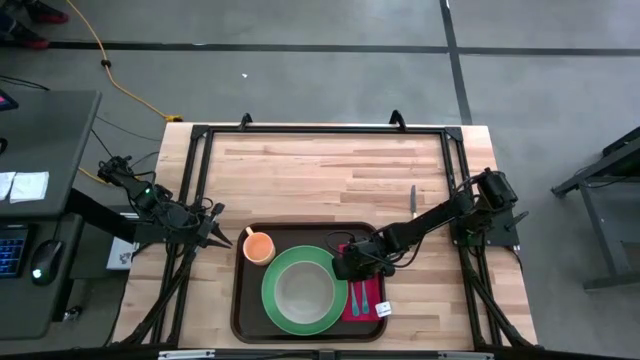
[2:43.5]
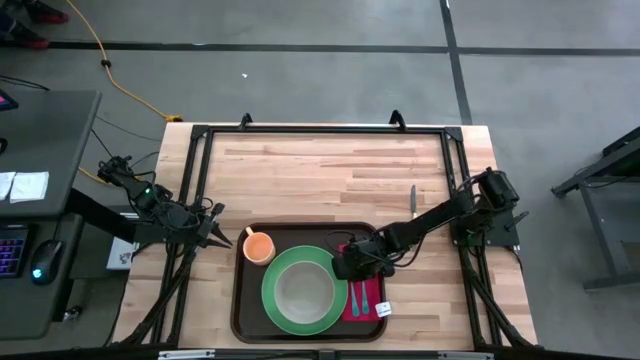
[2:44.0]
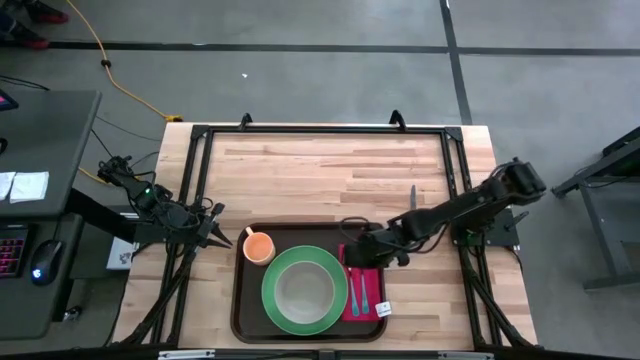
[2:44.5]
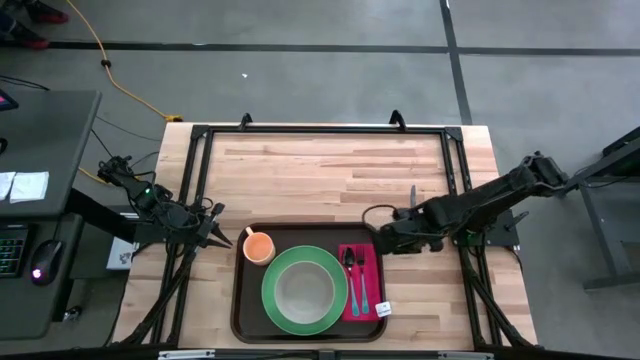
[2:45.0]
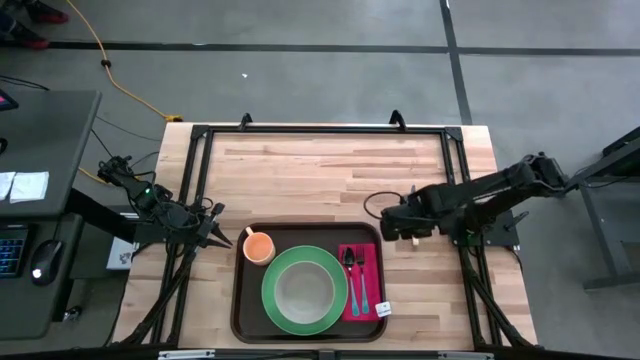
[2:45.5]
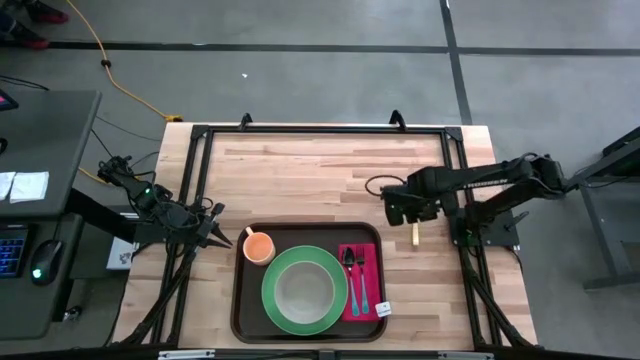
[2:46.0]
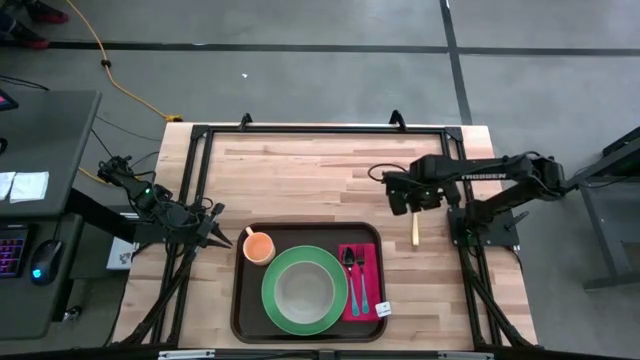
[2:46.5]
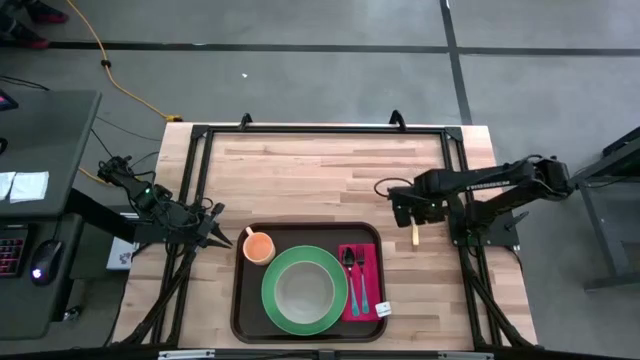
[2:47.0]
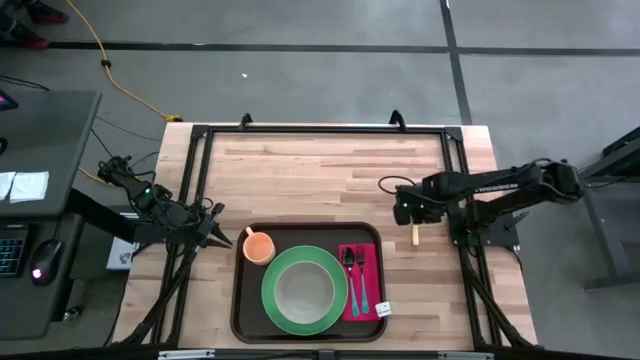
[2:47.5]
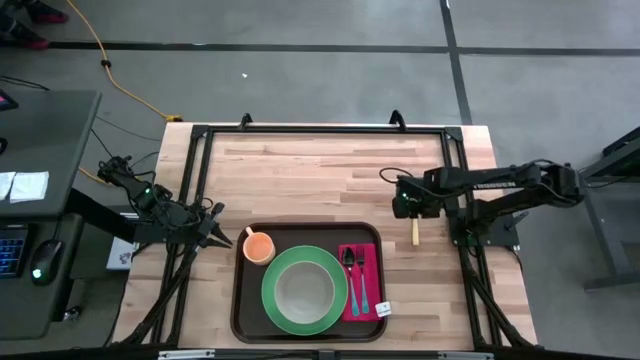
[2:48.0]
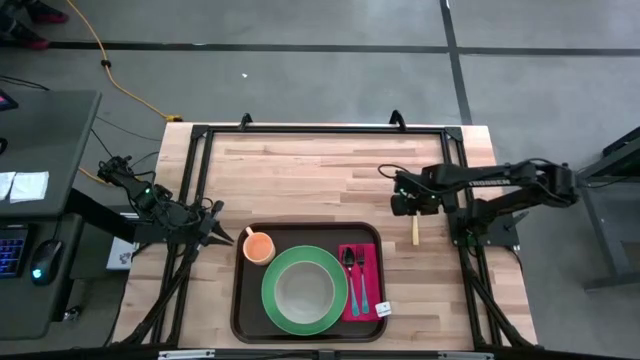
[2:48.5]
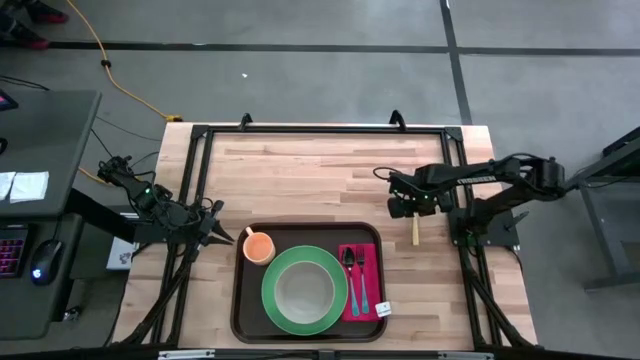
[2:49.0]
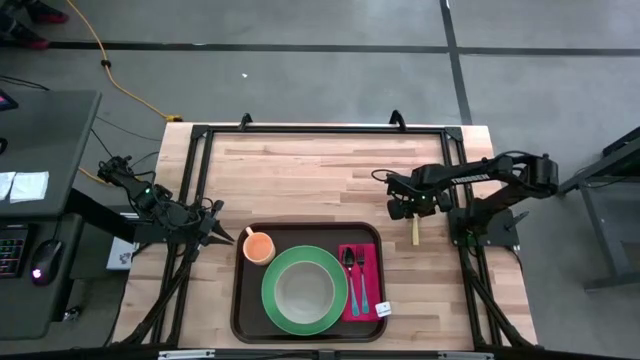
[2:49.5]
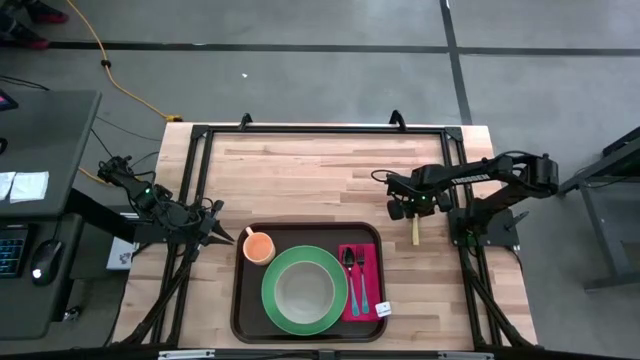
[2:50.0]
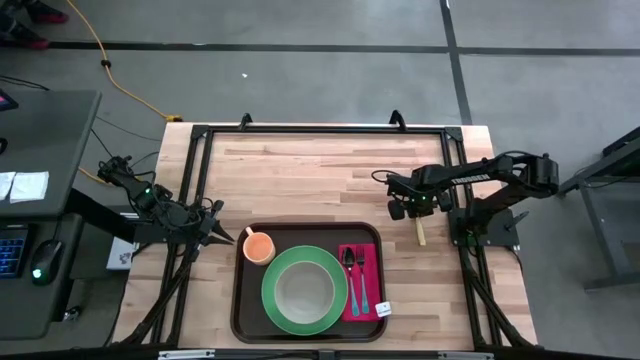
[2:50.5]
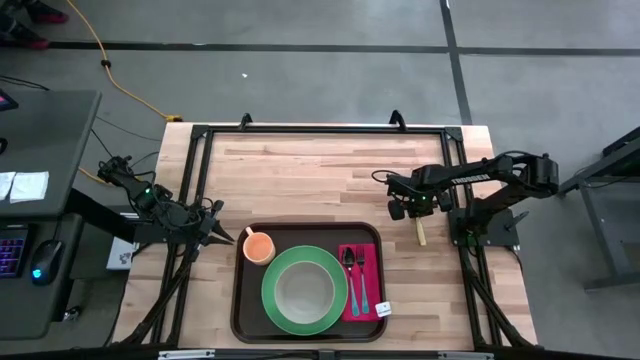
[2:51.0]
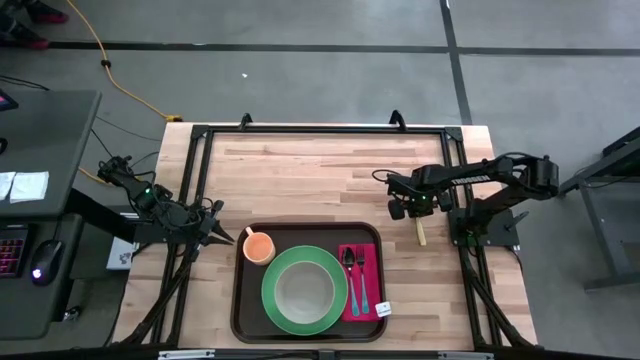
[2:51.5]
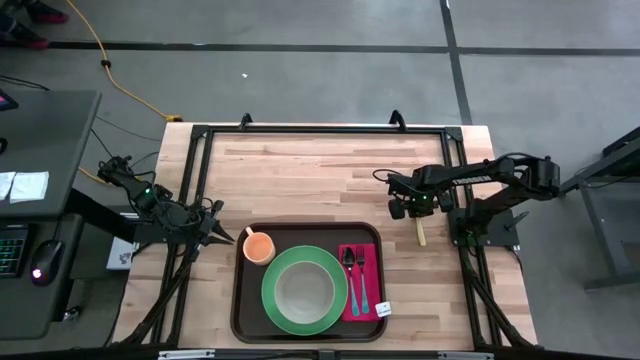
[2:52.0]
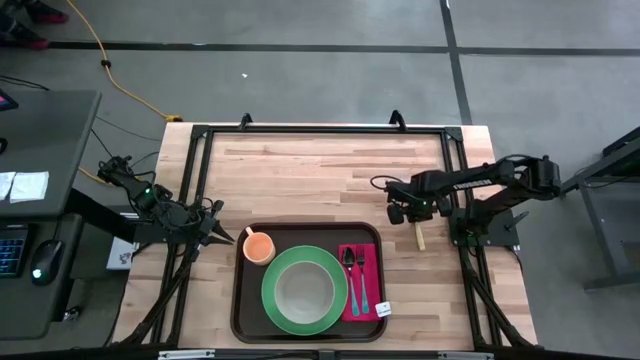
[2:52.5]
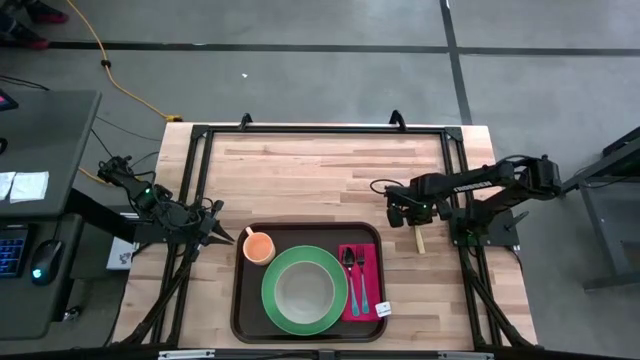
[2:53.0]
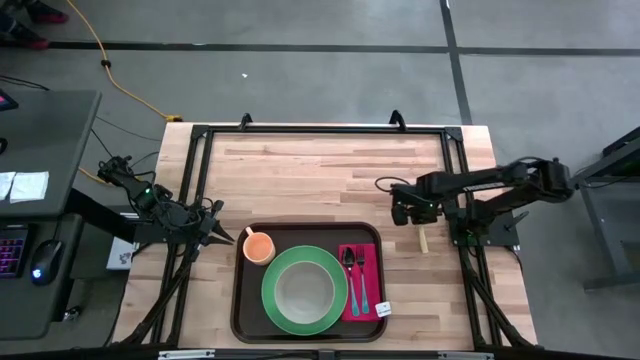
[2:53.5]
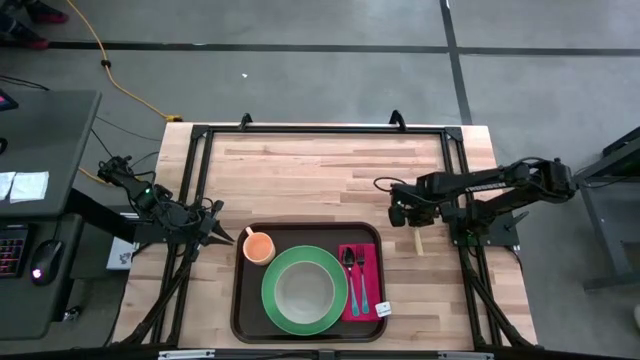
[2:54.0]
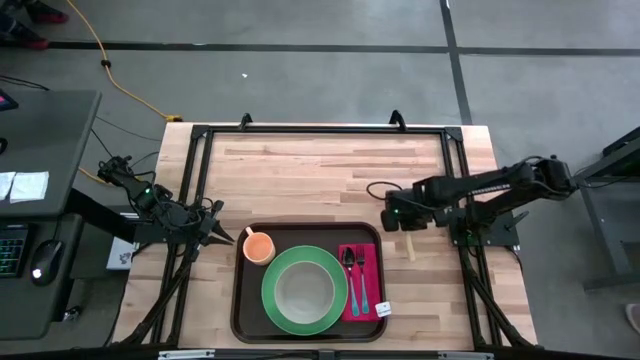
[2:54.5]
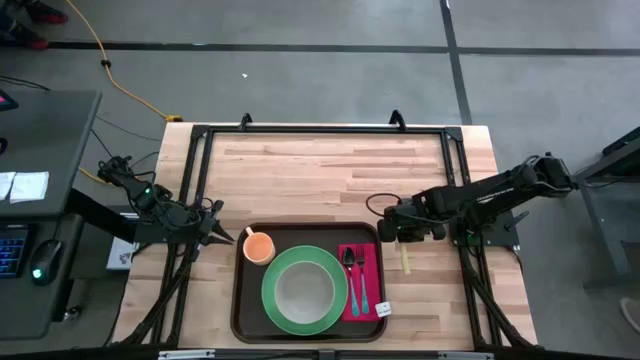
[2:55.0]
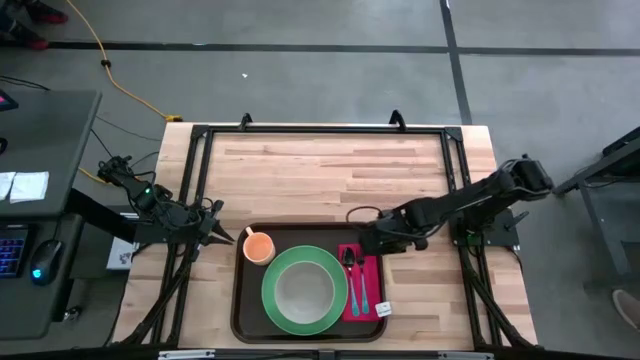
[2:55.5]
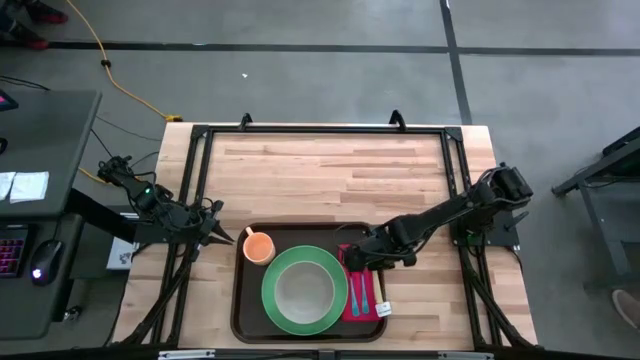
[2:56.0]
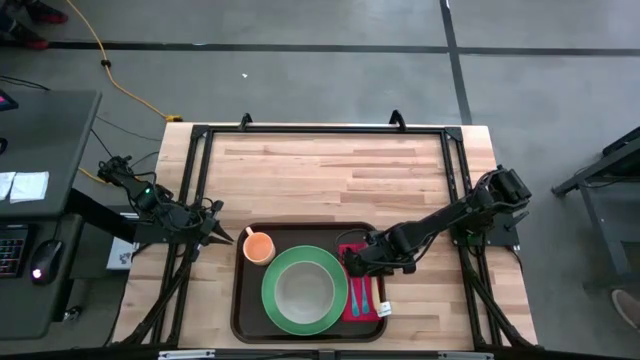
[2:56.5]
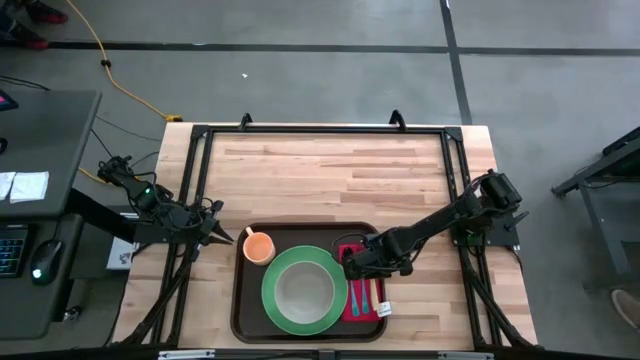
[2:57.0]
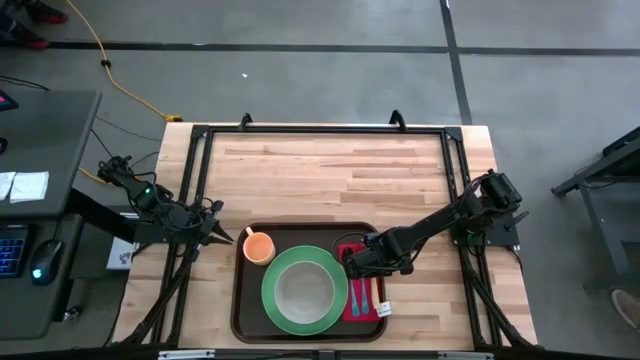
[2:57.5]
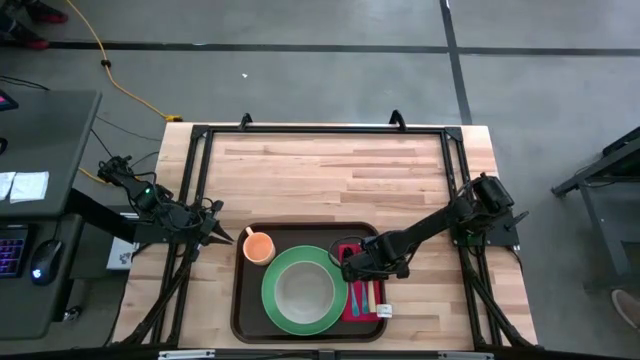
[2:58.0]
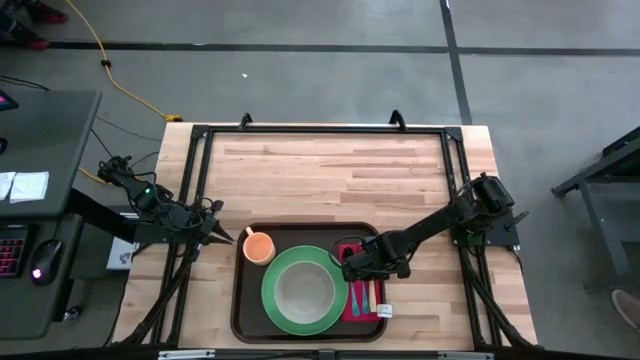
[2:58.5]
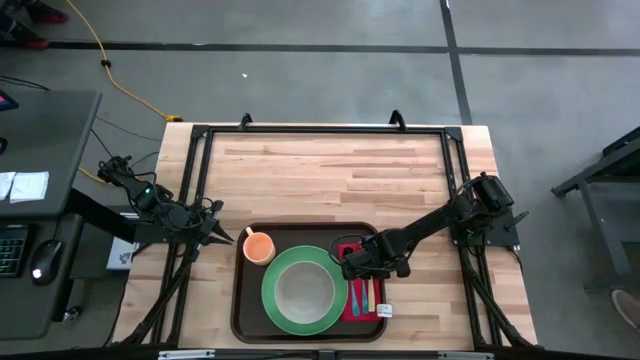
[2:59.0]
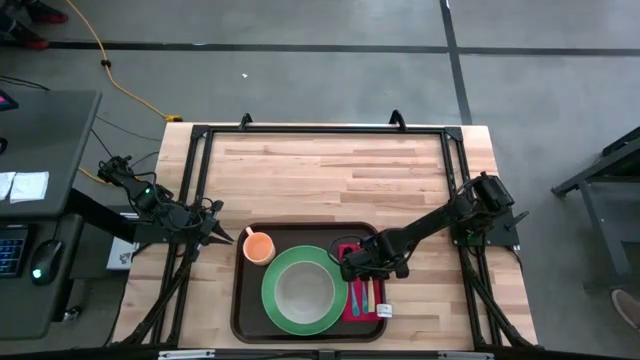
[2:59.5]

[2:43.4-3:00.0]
Task: Set up tray
Put the knife on the top of the table napkin to the right of the blue fork on the brown serving tray

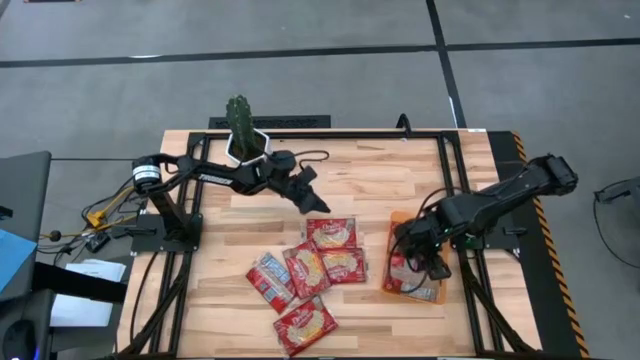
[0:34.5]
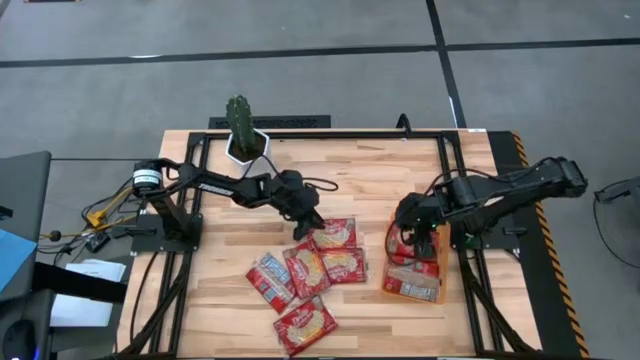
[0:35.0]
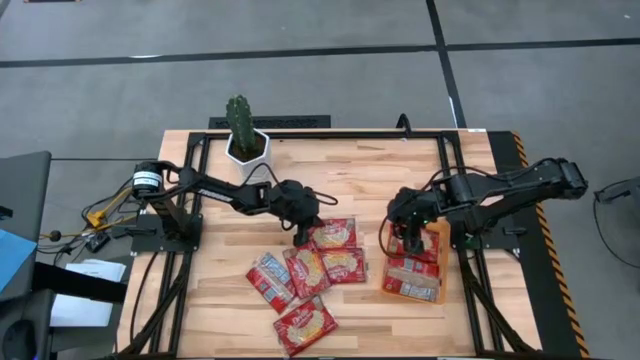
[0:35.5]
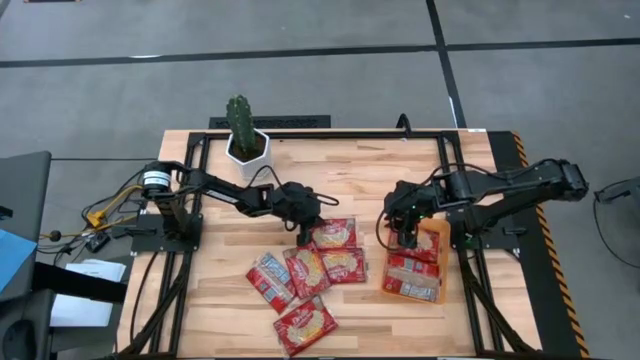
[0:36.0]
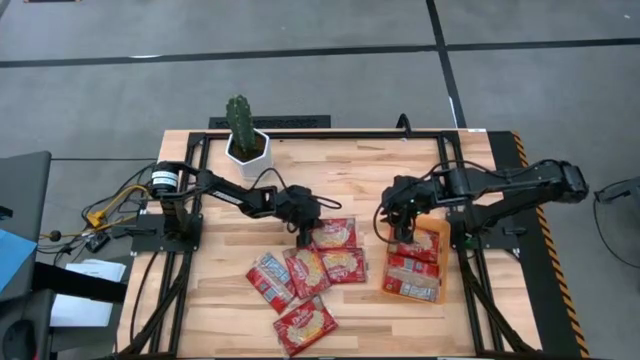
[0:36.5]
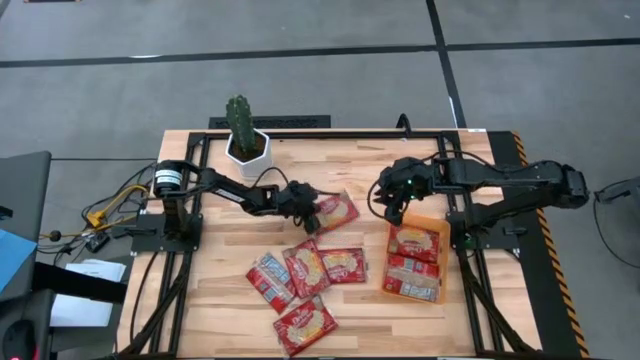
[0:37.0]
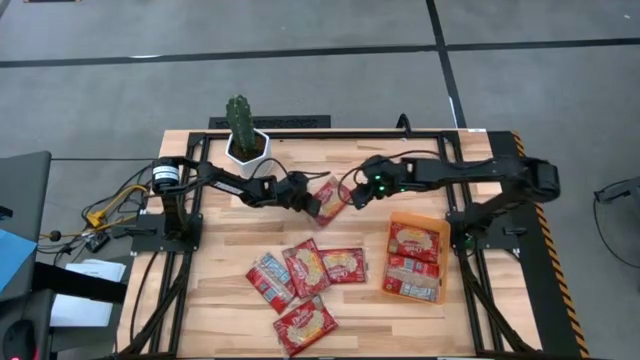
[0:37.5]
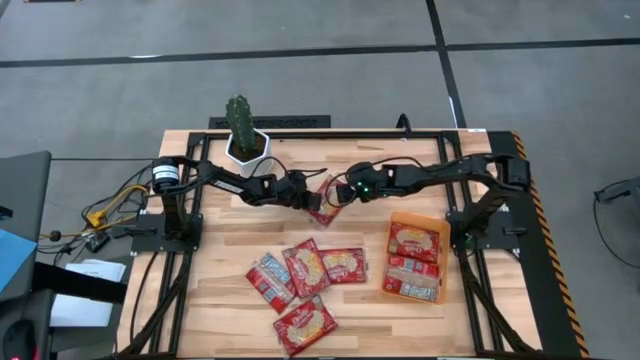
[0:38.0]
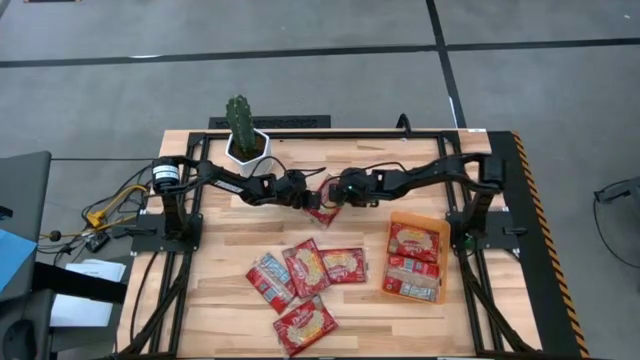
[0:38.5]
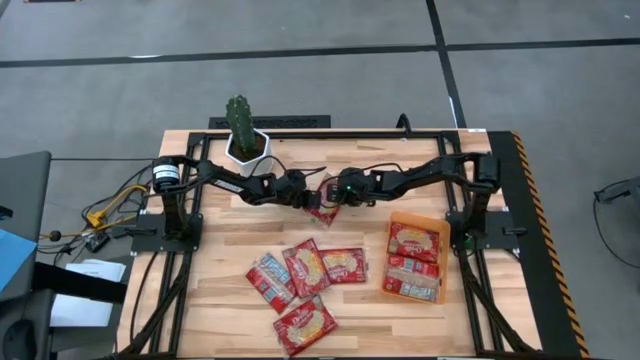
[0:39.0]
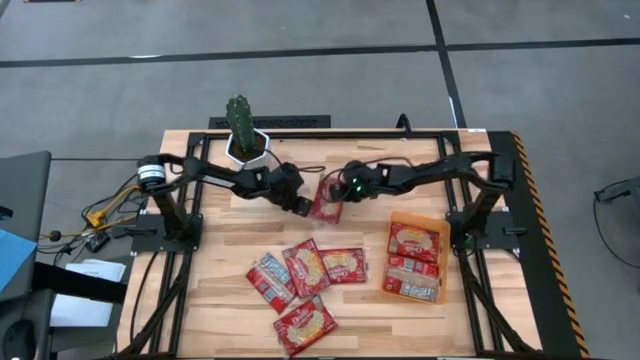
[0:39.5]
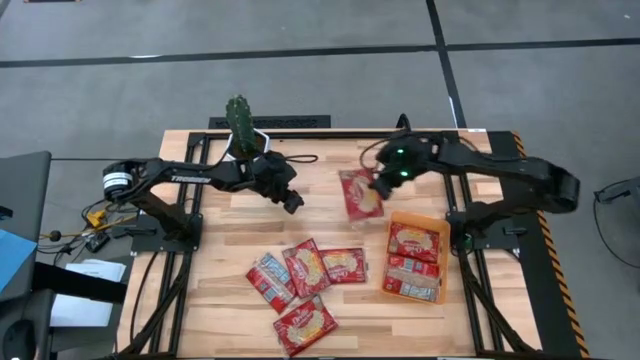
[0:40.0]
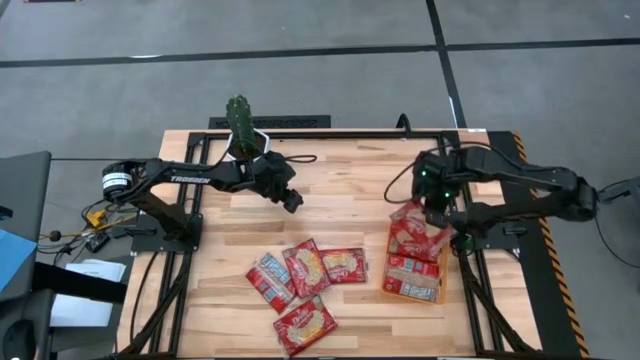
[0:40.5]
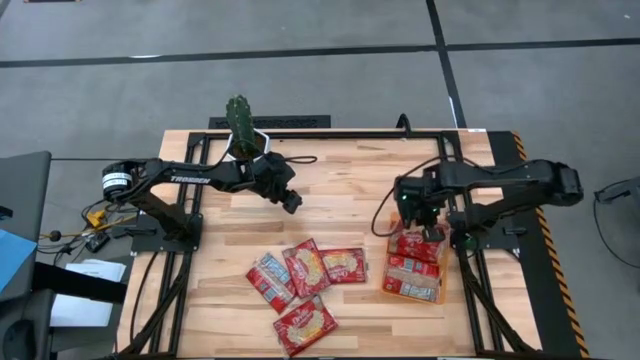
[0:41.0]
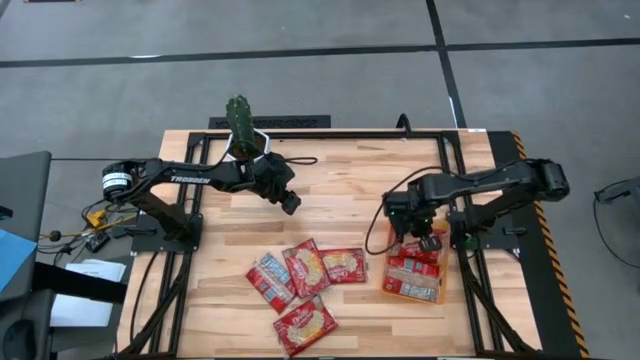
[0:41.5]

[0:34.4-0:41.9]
Task: Sort popcorn bags into baskets
Put the popcorn bag into the orange bin
